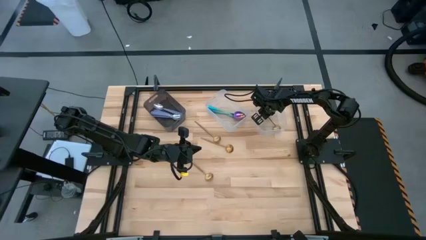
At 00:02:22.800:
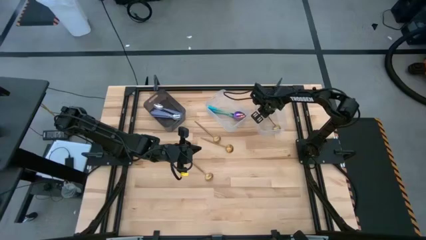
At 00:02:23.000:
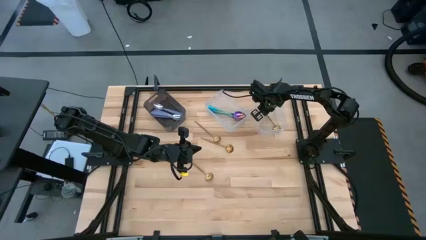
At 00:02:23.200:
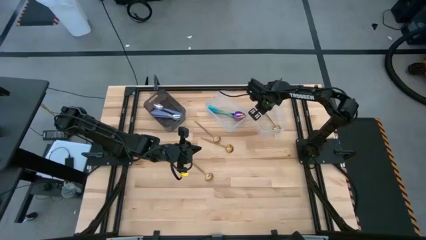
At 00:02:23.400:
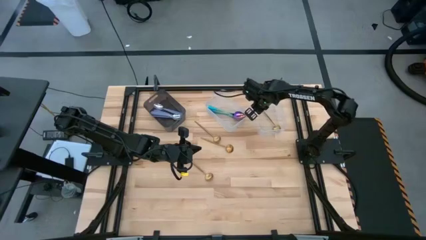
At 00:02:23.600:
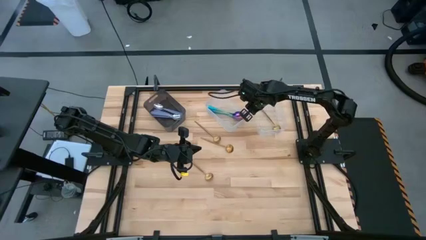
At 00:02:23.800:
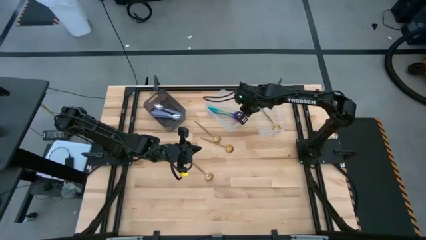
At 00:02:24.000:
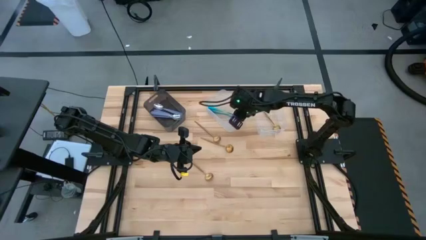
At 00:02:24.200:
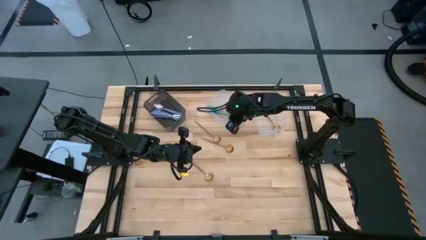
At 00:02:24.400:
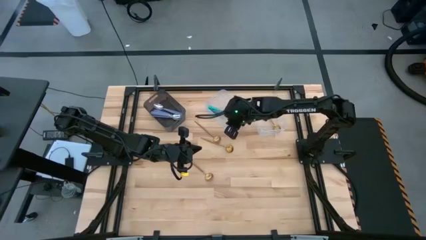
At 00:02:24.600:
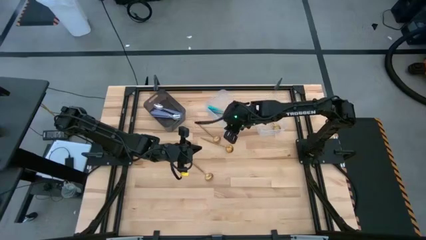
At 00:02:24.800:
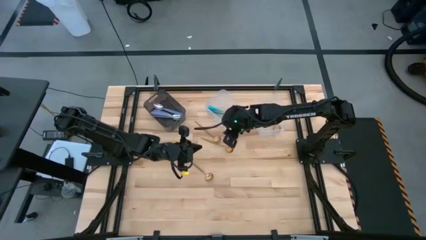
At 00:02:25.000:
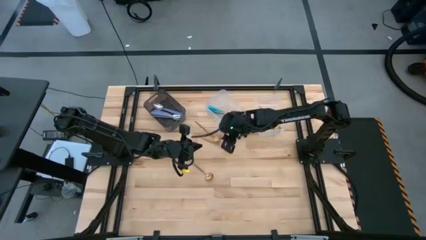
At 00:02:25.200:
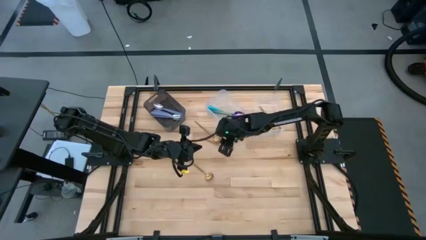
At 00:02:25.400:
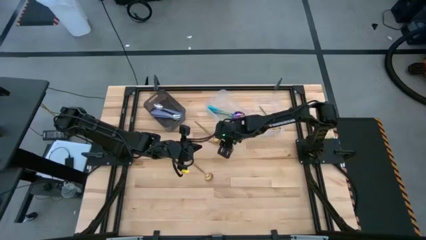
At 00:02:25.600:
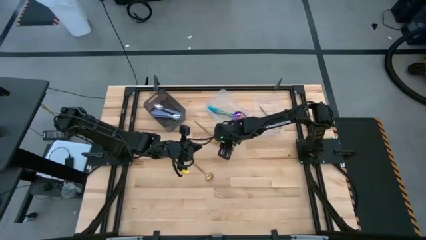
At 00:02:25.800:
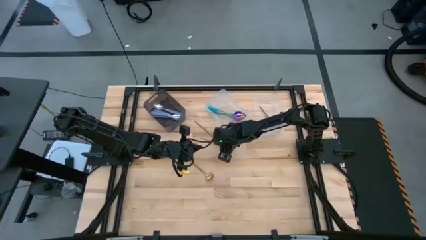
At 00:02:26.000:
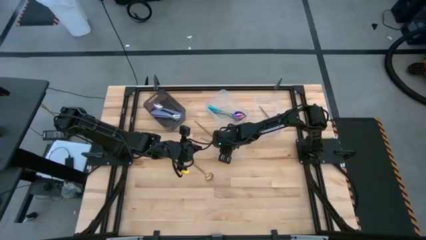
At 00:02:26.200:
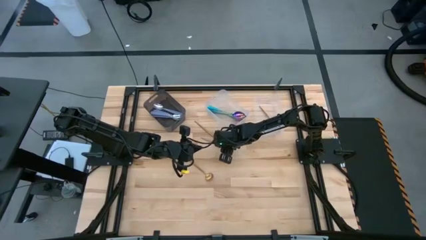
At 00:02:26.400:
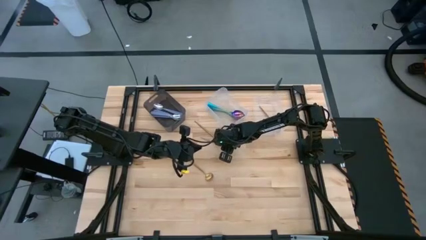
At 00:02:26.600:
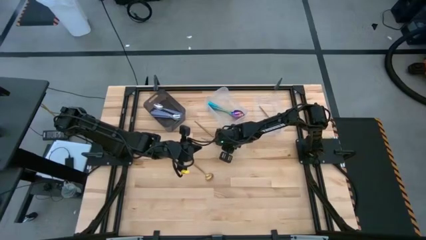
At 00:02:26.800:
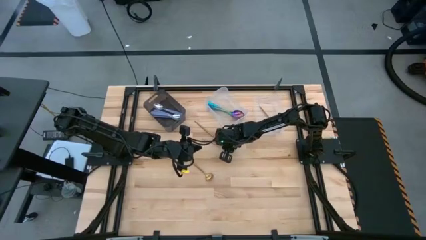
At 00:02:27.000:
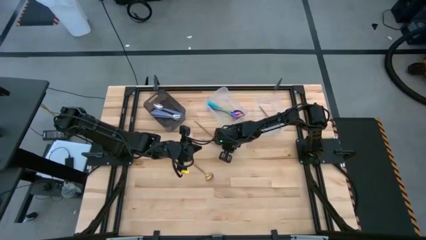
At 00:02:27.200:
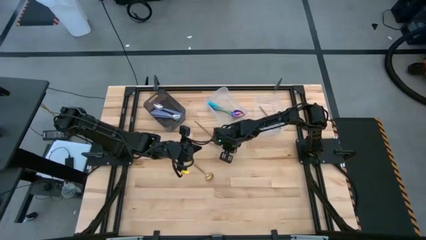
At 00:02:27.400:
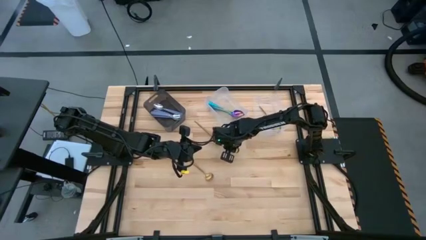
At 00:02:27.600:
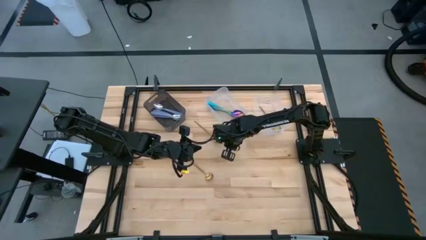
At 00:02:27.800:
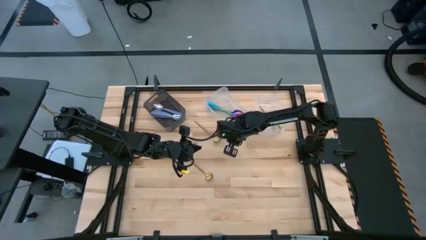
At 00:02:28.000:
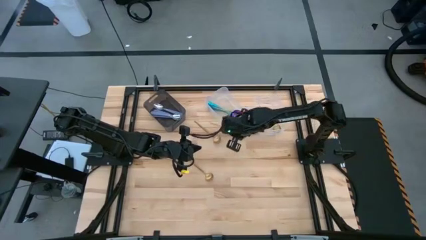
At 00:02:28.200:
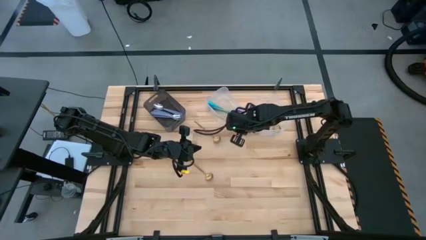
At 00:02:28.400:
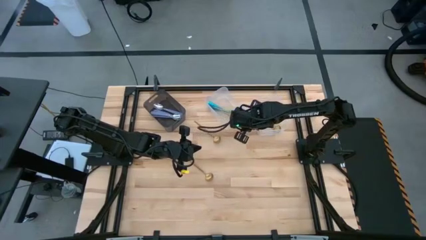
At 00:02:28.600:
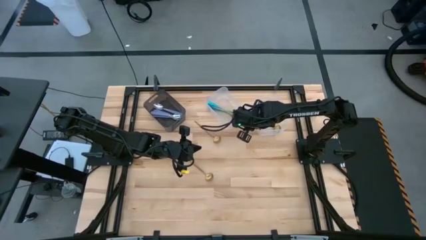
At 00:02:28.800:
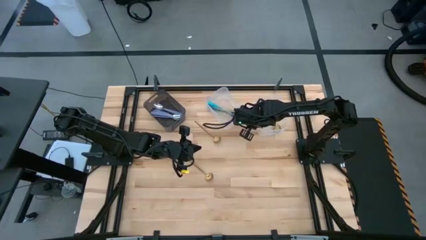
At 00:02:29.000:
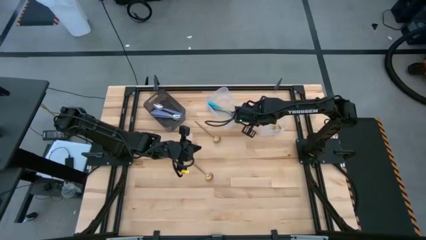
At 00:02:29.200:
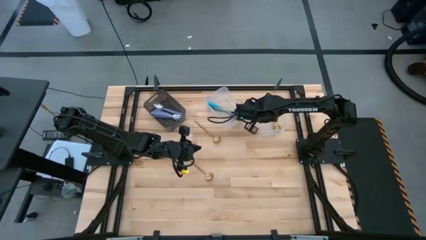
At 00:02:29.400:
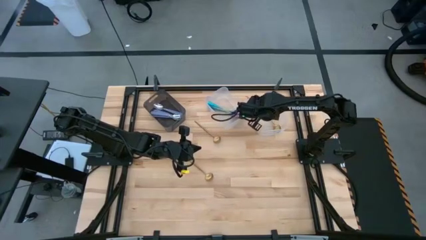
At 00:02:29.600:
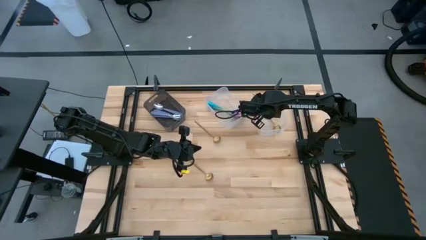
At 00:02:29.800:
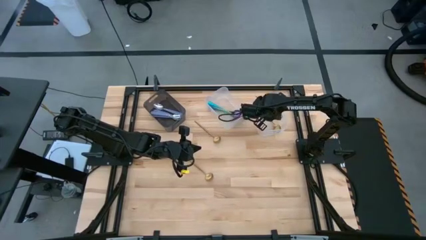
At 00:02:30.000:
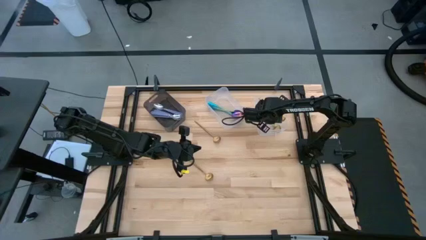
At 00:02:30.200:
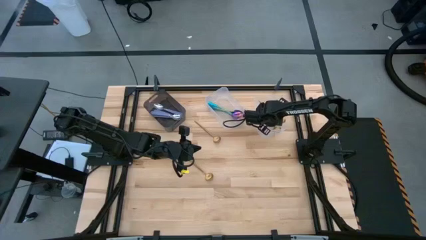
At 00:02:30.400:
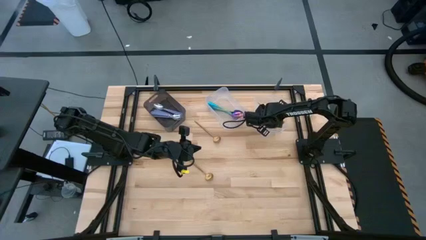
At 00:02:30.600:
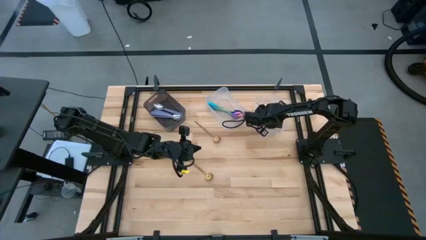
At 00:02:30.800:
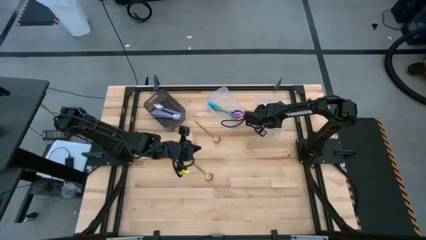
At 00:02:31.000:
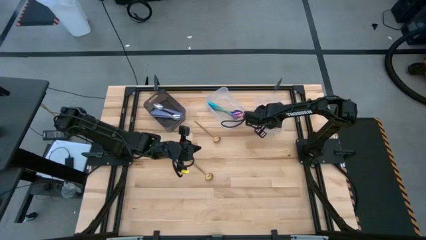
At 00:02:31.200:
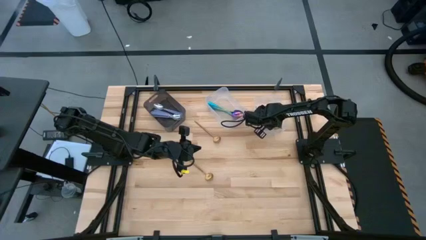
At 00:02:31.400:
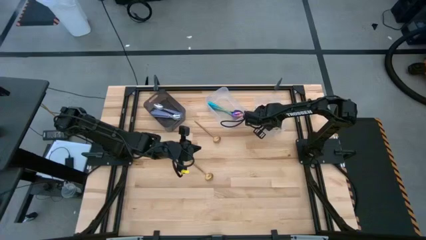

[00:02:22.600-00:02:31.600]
Task: Sort silverware by color (type)
Put the gold spoon into the right transparent bin

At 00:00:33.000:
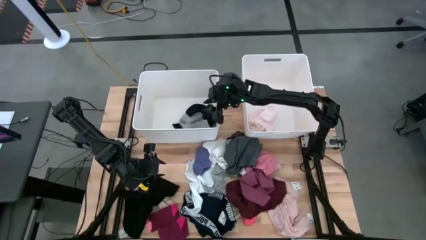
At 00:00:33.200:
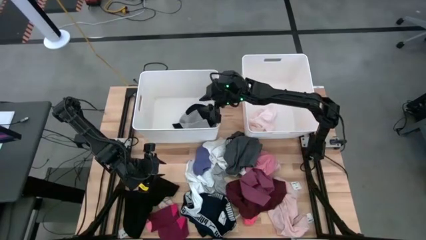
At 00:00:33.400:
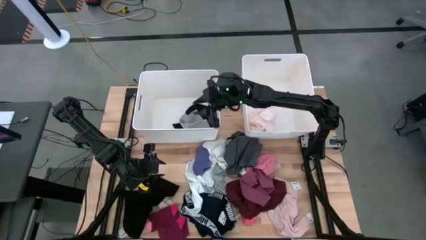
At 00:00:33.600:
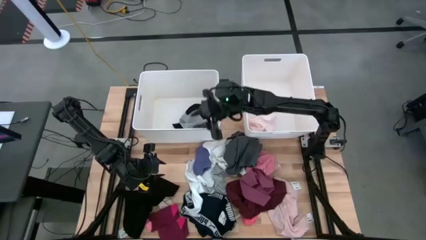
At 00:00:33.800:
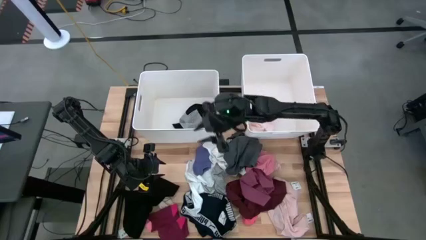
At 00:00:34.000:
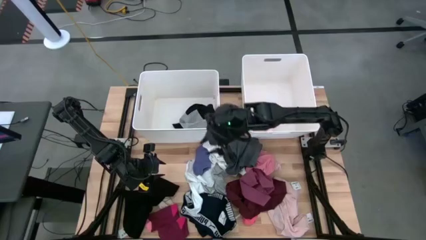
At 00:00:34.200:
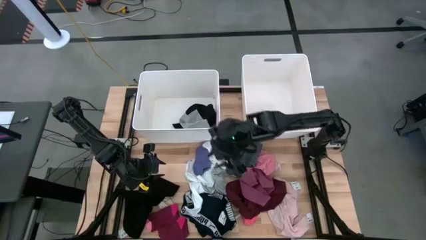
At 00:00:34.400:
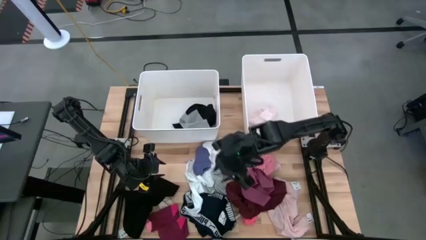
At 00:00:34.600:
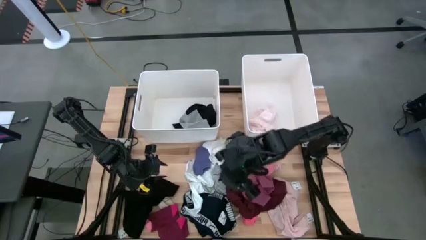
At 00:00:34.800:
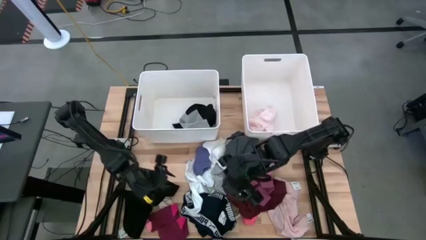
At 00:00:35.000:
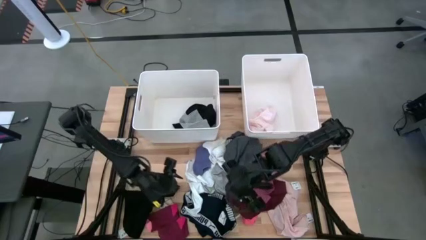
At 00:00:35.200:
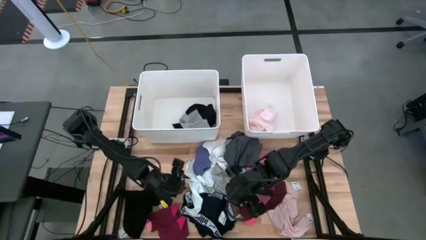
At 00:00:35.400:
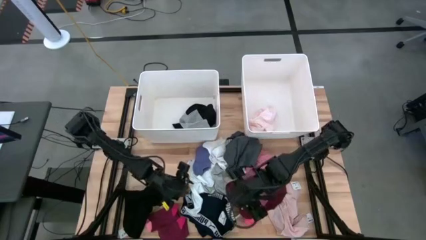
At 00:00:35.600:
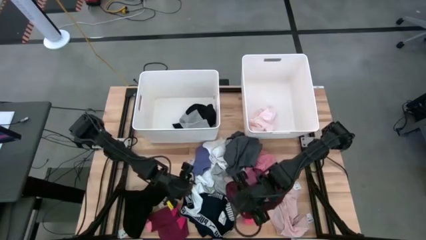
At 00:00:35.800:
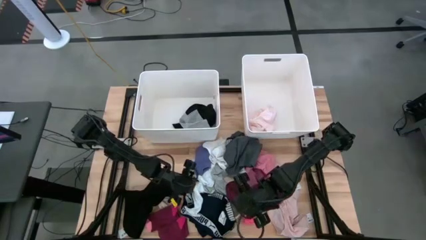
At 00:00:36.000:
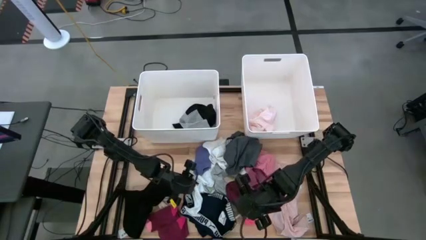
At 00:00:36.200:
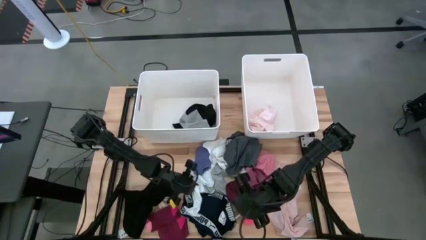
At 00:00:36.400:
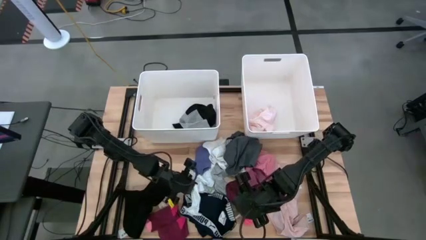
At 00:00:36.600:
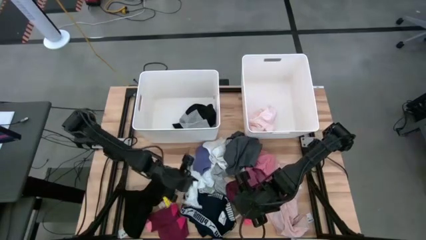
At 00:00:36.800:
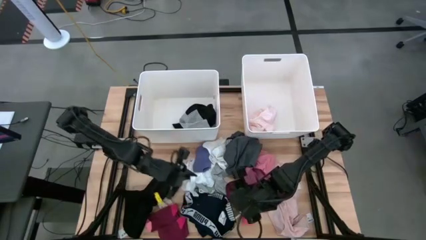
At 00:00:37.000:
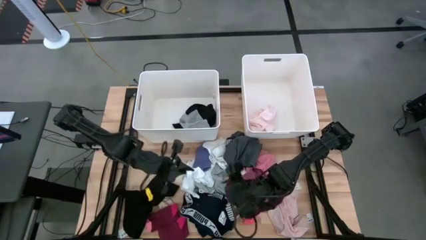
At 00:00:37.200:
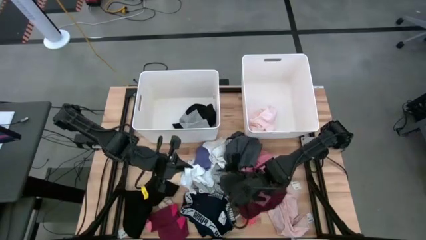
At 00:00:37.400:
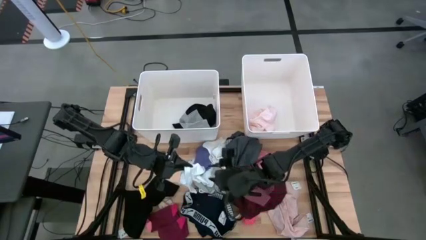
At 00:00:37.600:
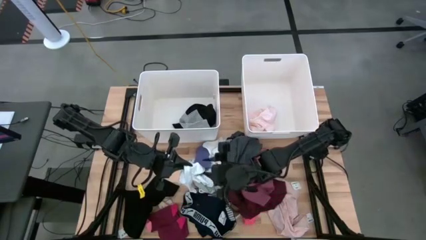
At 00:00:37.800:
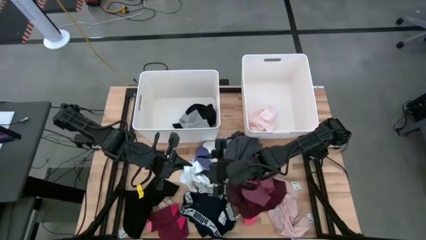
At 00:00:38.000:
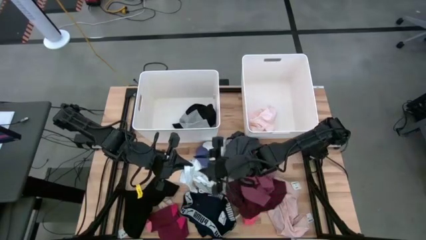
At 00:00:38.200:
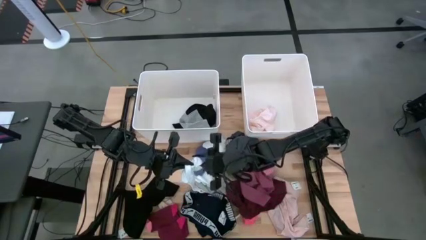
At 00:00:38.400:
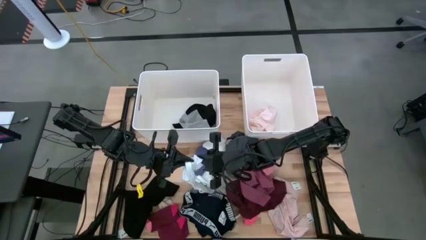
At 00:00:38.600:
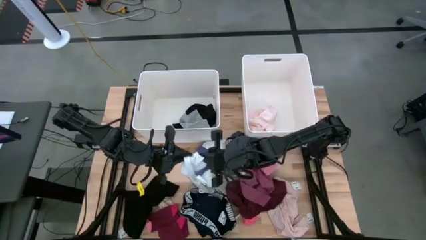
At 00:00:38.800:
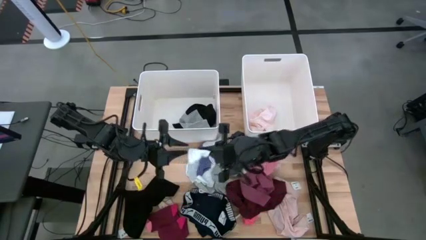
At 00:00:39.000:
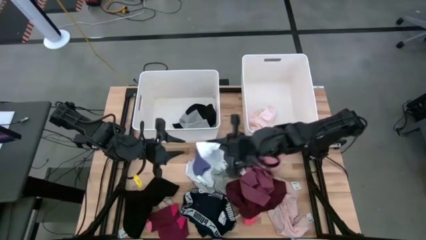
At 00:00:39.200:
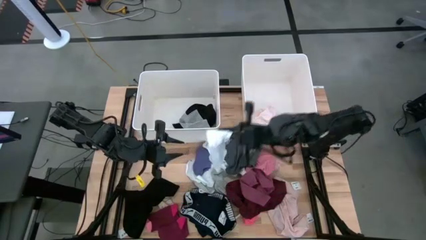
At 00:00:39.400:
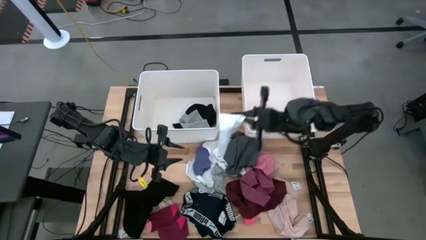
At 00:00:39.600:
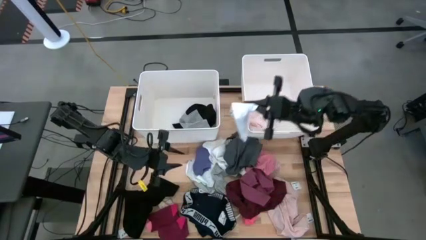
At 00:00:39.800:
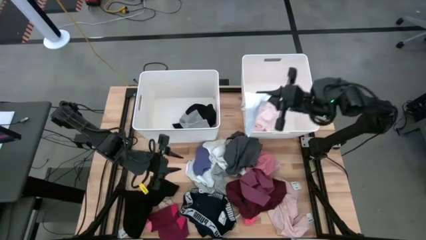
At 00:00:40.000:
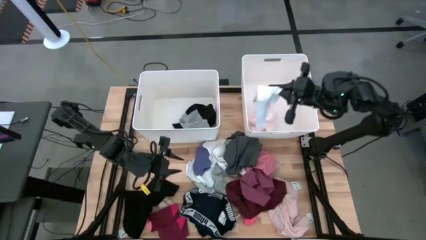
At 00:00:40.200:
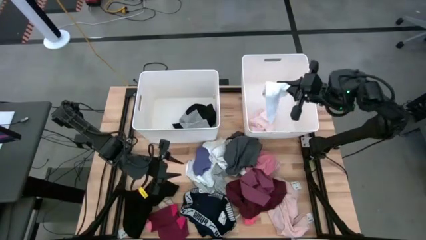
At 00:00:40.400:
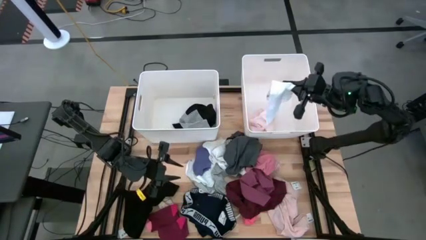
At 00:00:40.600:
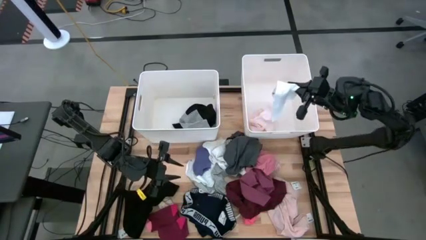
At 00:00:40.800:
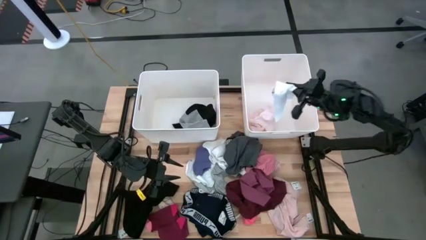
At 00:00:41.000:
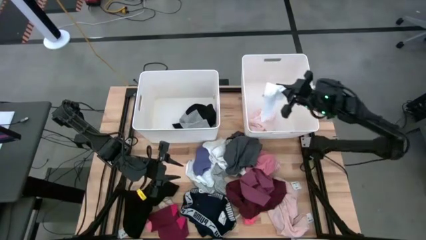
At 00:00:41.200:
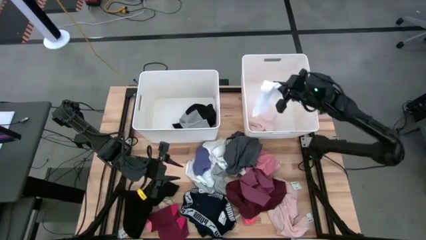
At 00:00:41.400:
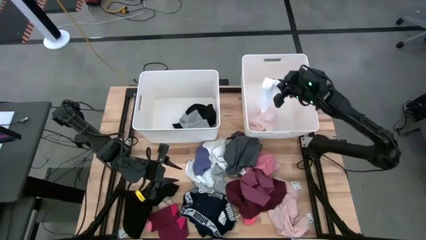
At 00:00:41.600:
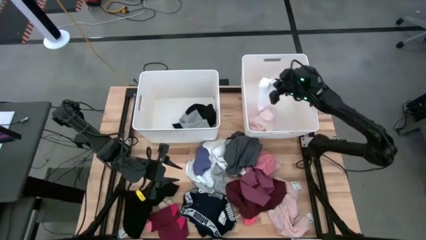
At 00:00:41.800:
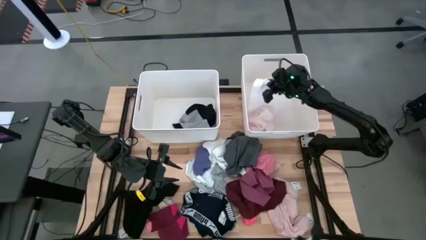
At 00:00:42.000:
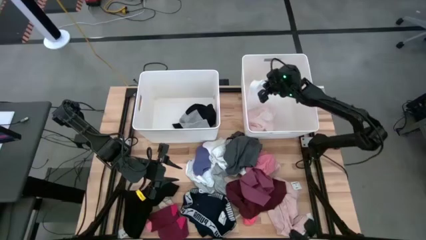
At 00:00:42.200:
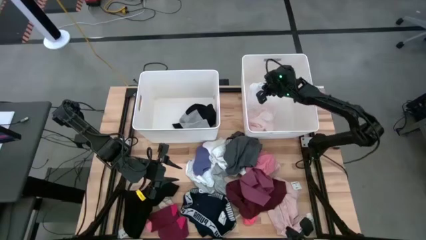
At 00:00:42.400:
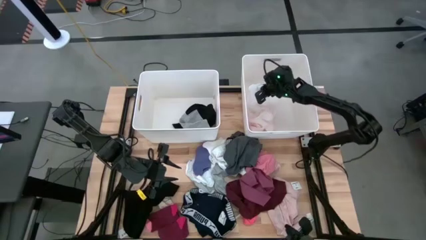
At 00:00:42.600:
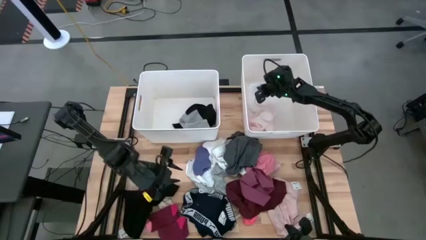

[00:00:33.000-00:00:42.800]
Task: Sort clothes
Put the white sock into the right white laundry organizer
